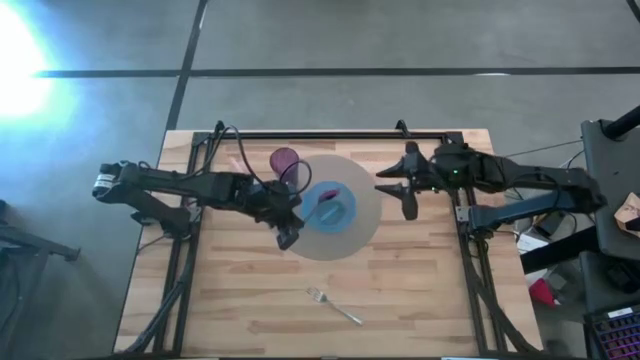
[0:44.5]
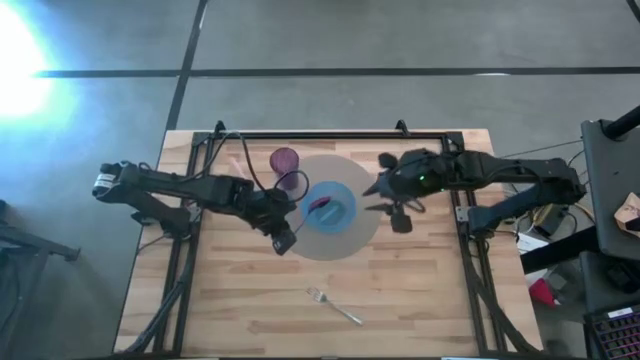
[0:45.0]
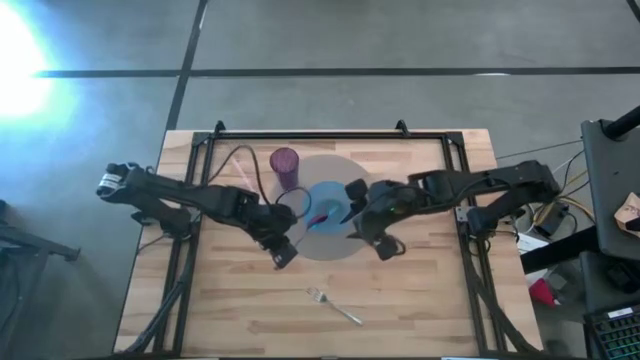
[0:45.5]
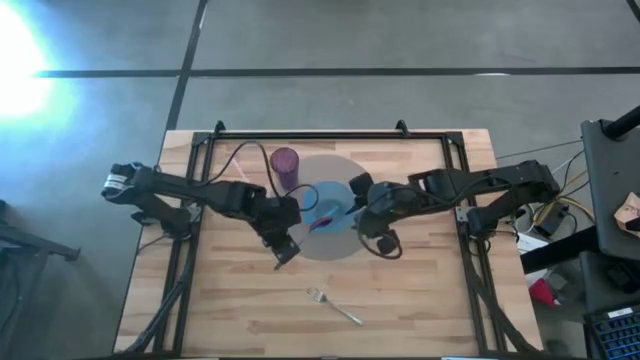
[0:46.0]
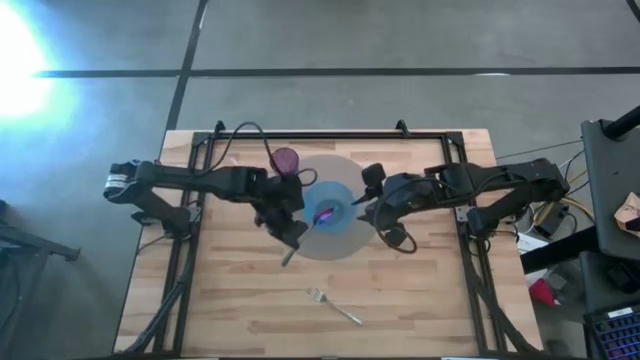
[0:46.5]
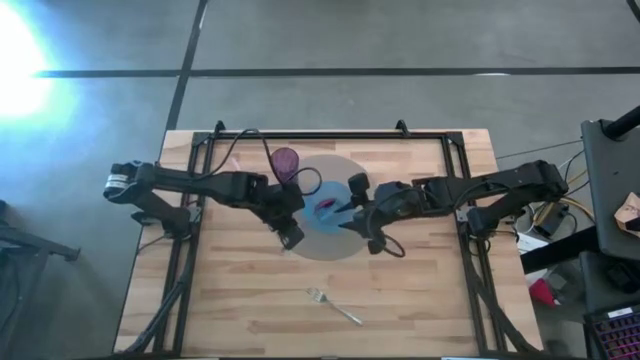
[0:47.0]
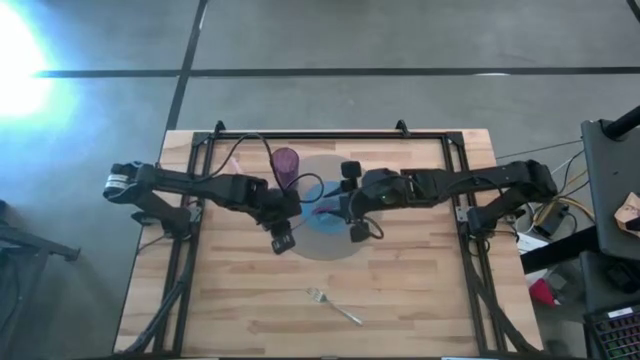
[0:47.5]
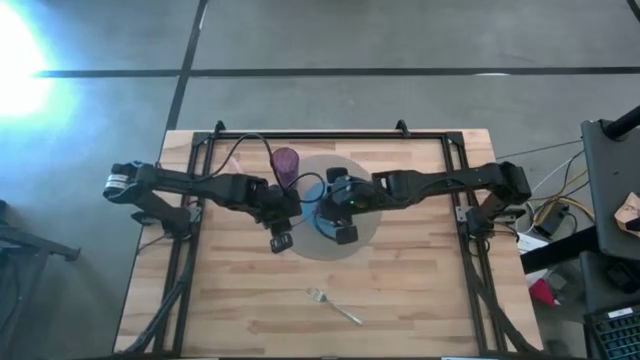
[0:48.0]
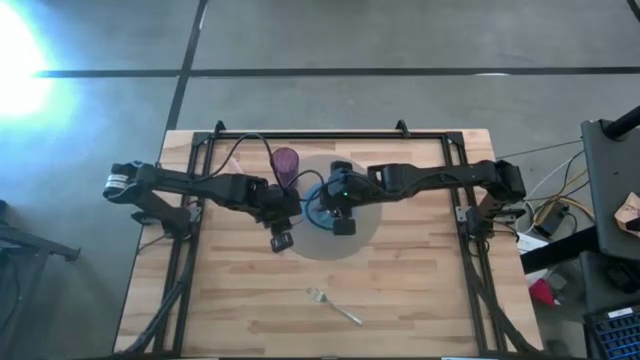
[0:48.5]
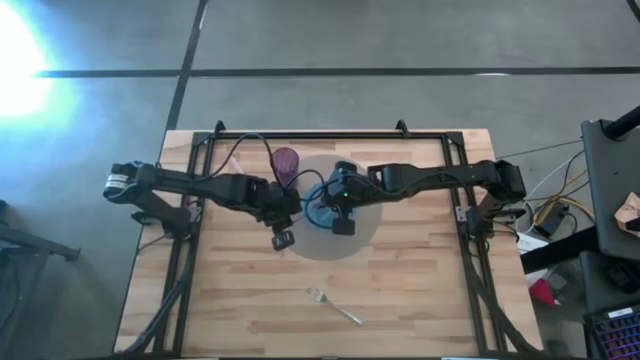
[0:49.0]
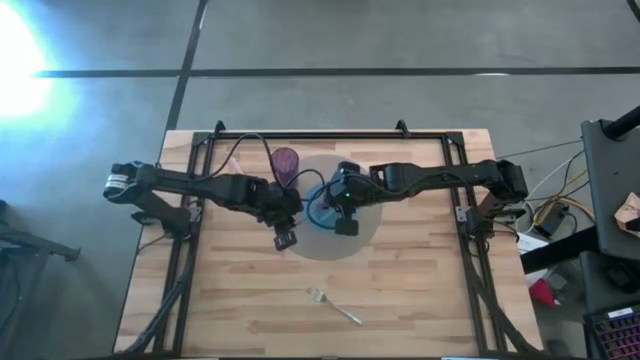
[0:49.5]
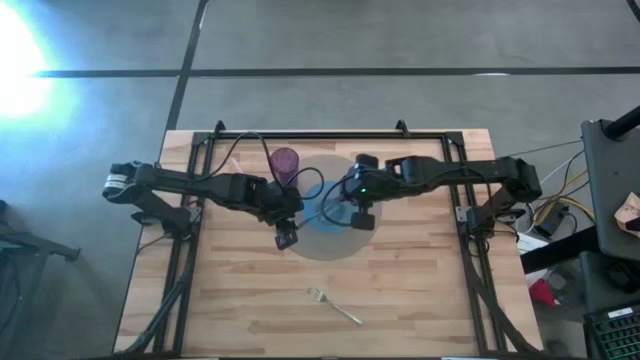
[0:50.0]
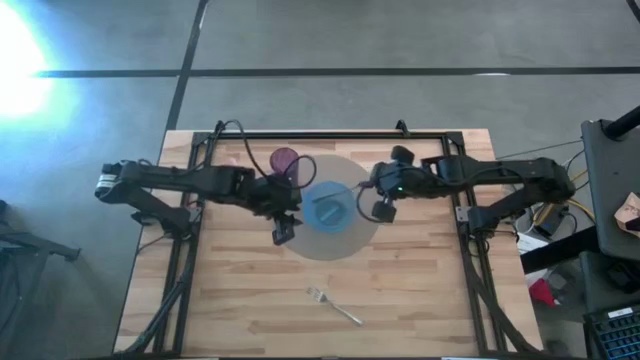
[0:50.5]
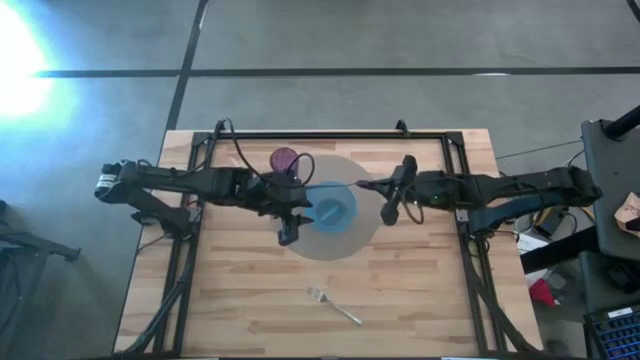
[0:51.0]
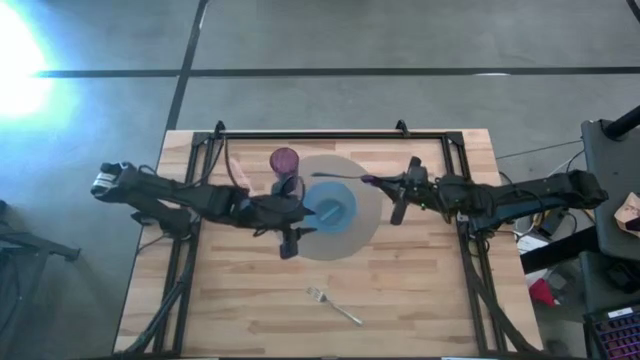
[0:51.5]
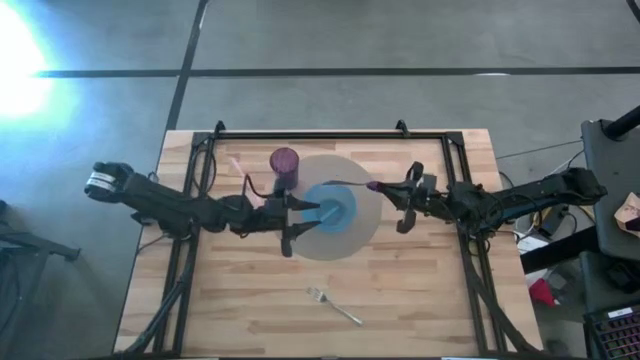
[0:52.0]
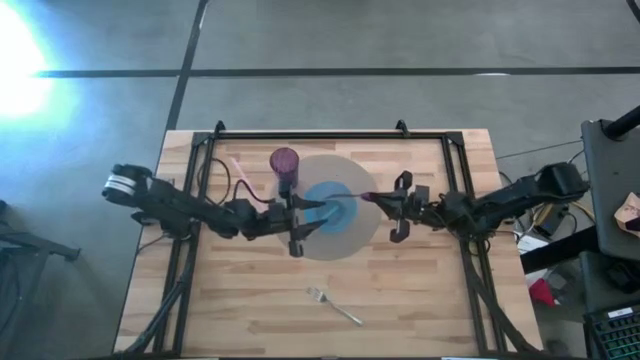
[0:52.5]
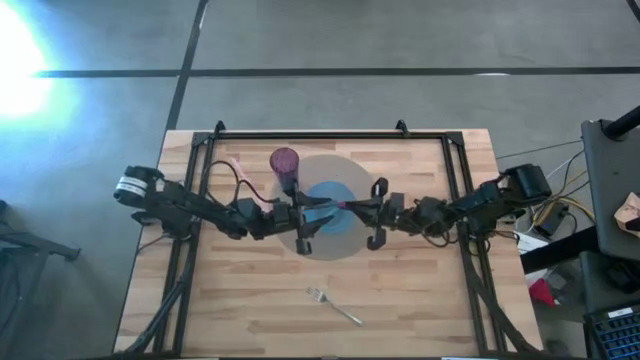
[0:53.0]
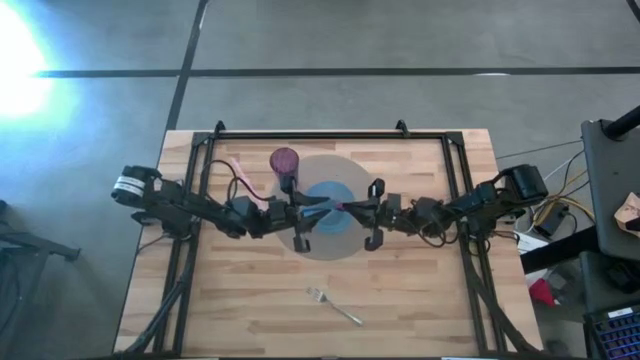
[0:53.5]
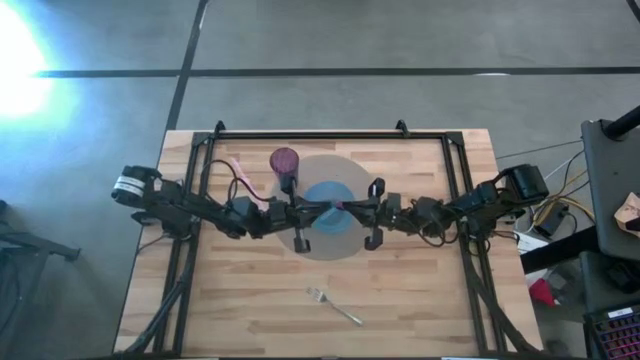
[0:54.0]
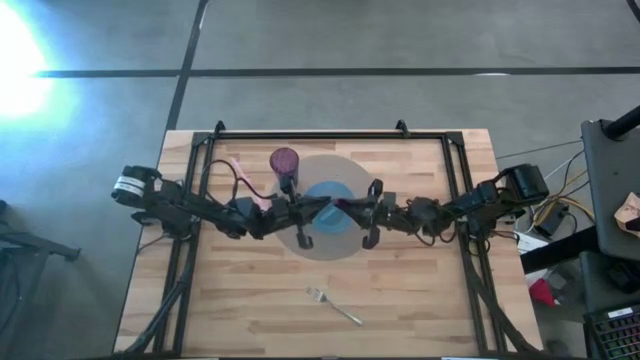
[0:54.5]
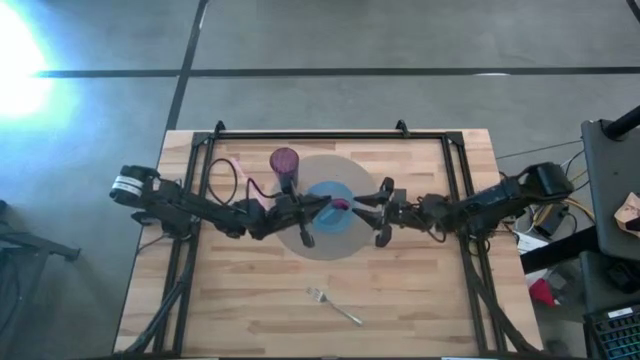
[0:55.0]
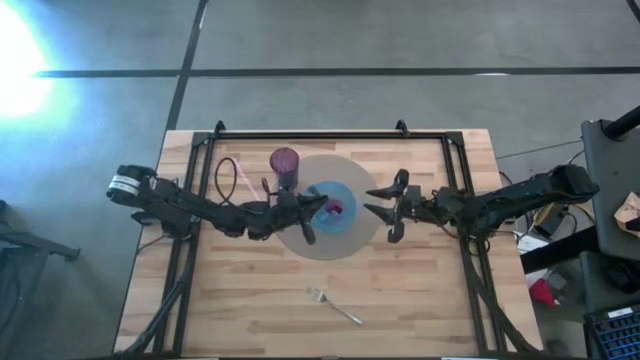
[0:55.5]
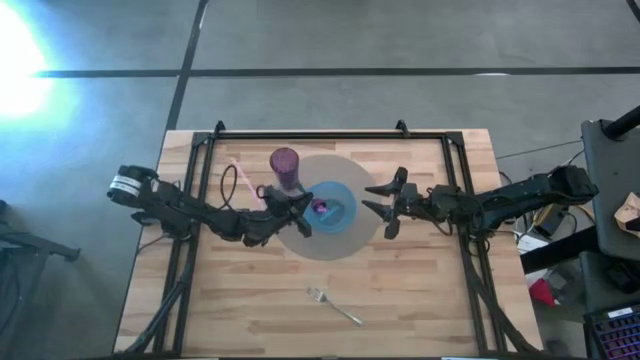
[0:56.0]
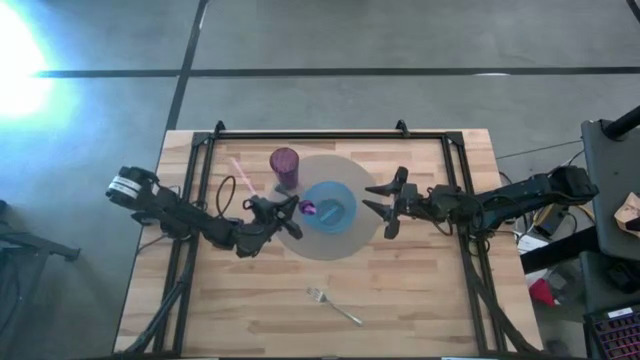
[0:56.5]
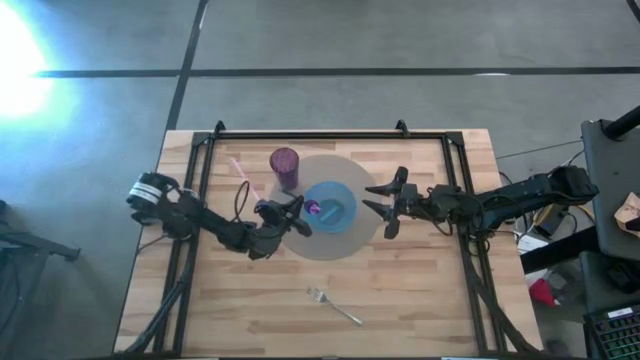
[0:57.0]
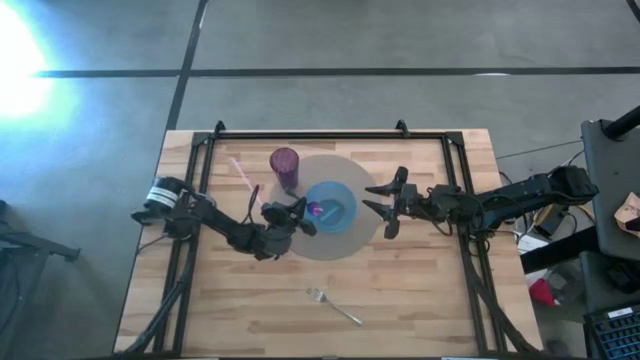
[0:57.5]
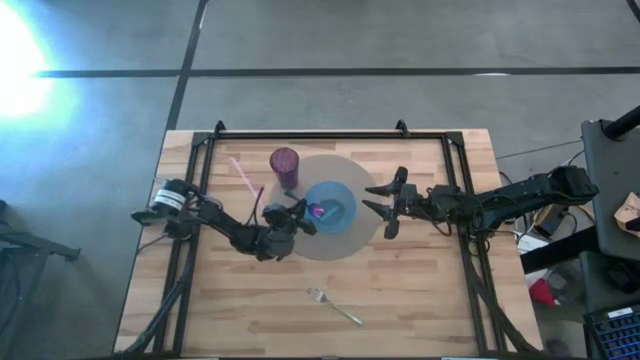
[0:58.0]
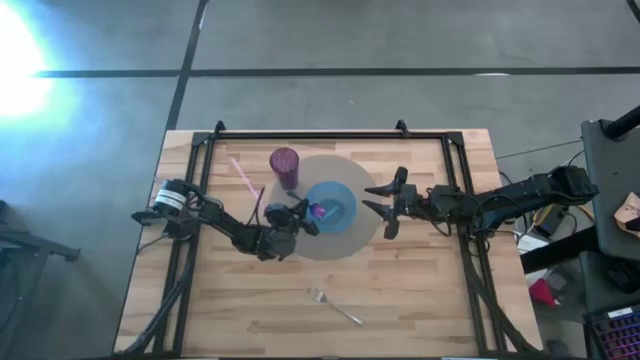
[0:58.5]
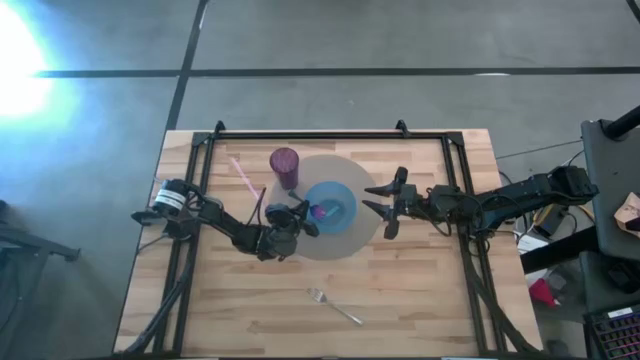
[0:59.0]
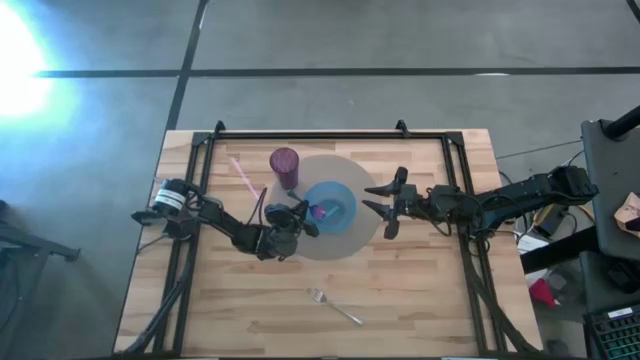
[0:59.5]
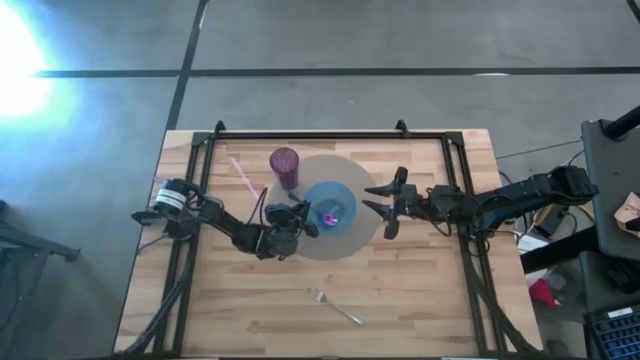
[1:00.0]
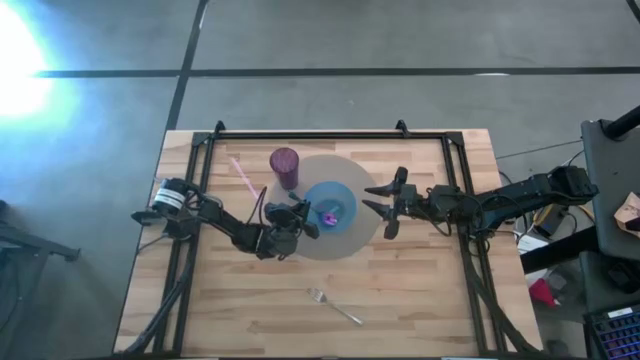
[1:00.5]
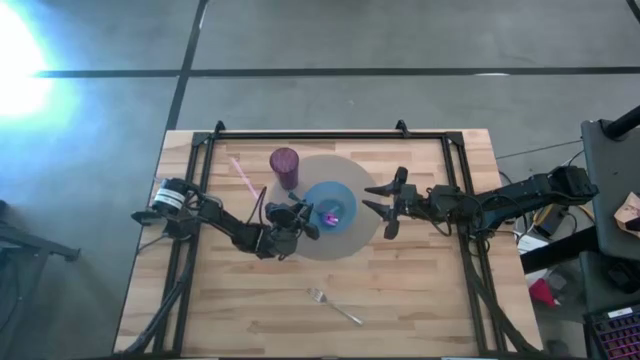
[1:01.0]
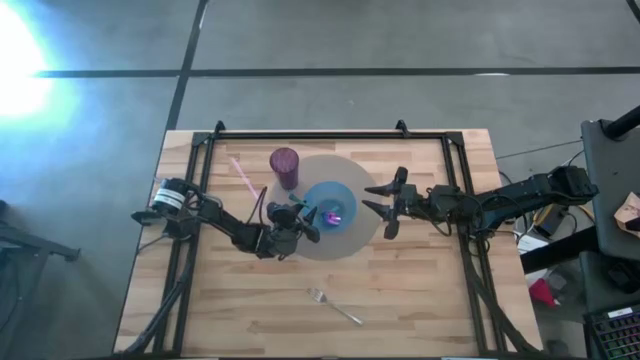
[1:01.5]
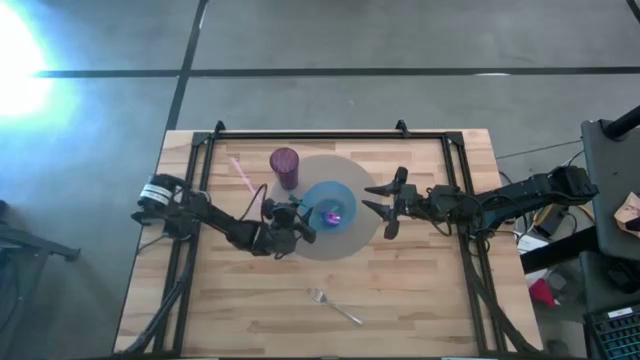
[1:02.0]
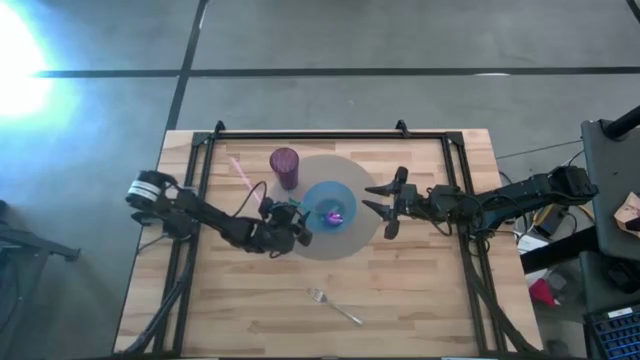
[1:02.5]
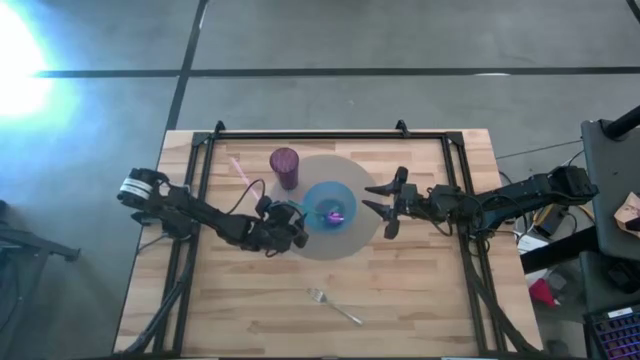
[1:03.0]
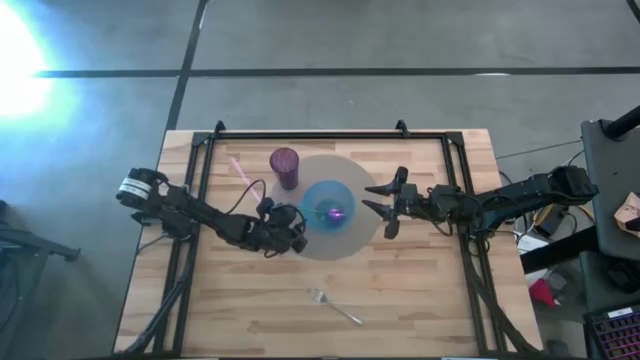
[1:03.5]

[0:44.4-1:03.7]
Task: Pick & Place Utensil
Put the violet spoon into the blue bowl on the gray mat

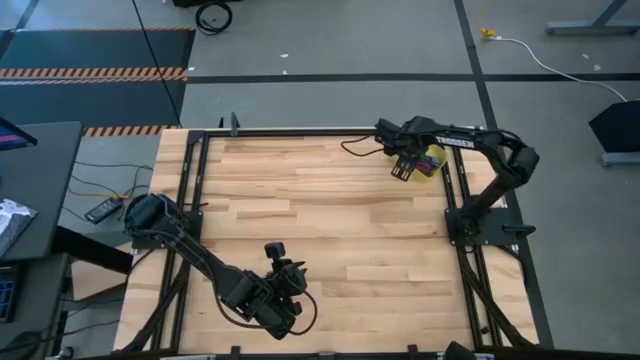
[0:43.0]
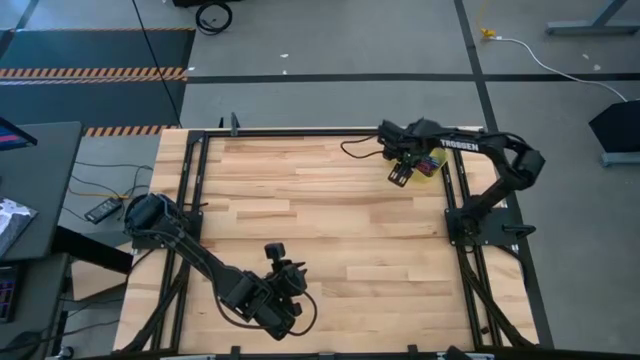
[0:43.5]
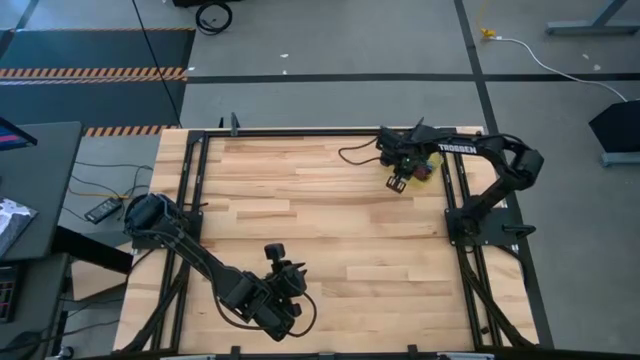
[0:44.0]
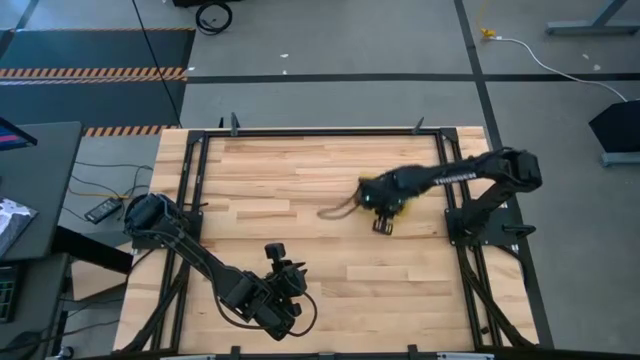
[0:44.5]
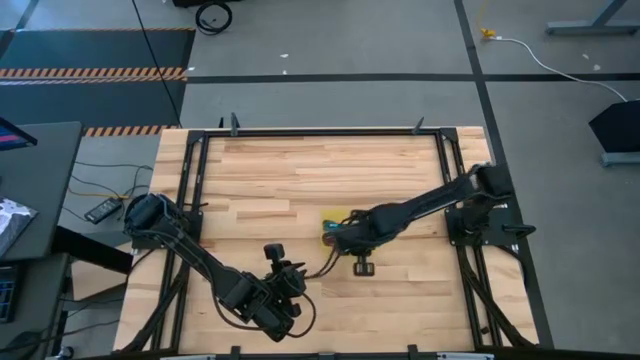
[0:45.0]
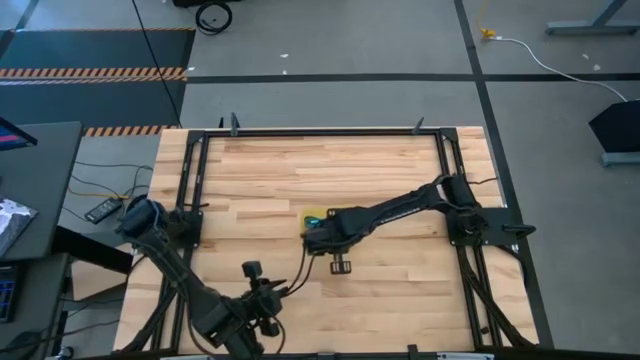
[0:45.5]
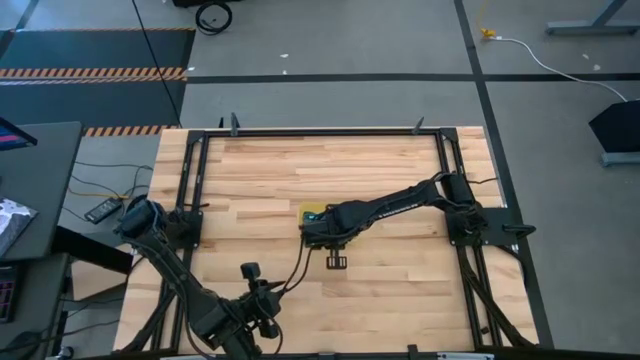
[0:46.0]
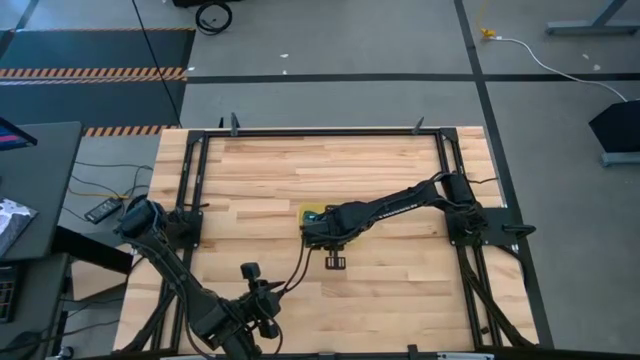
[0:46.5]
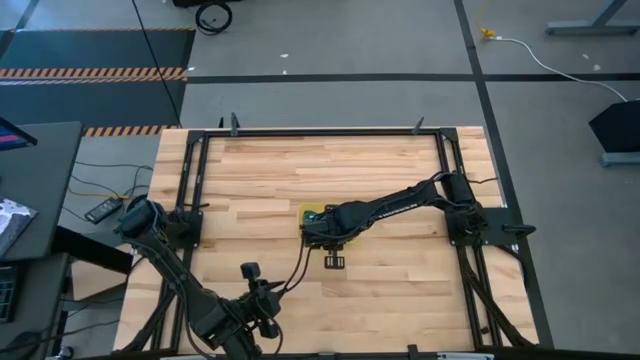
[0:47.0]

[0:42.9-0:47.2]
Task: Pick and place USB-C Cables
Move the yellow container to the center of the table
